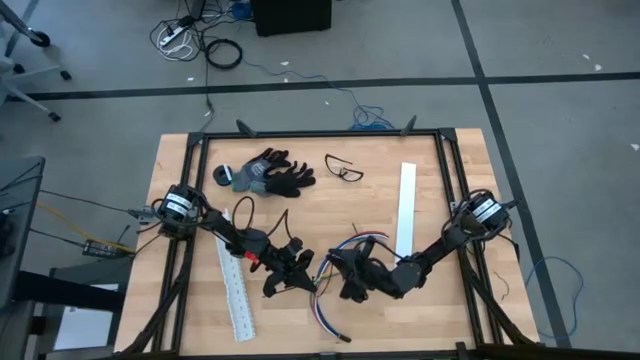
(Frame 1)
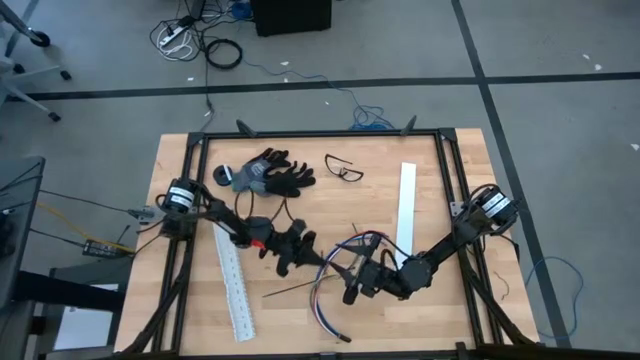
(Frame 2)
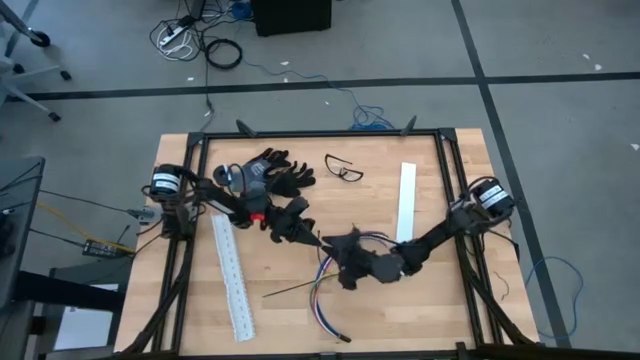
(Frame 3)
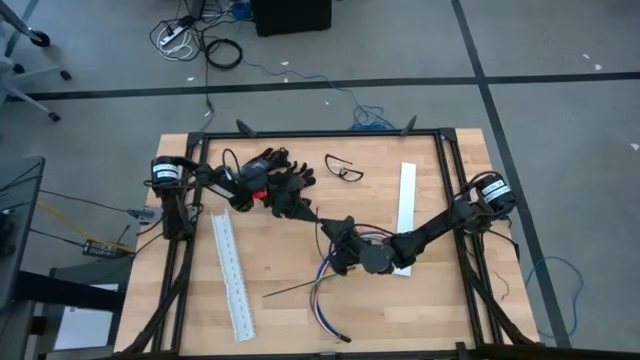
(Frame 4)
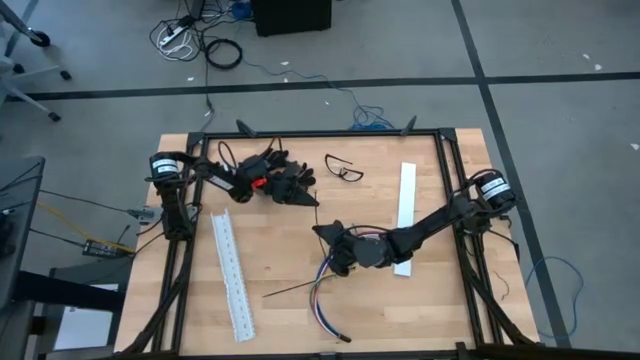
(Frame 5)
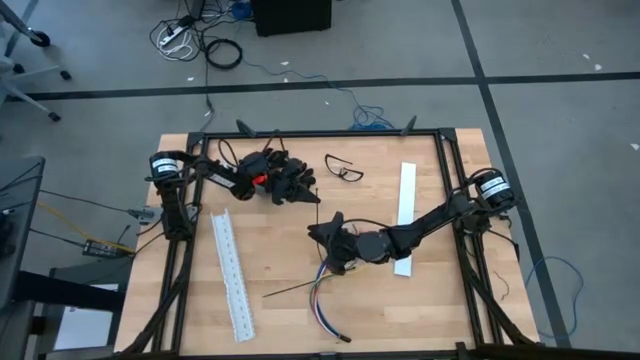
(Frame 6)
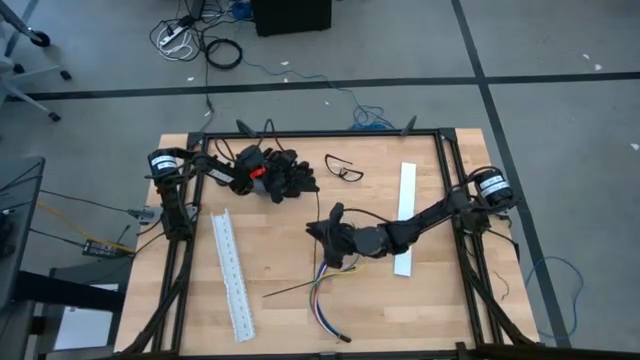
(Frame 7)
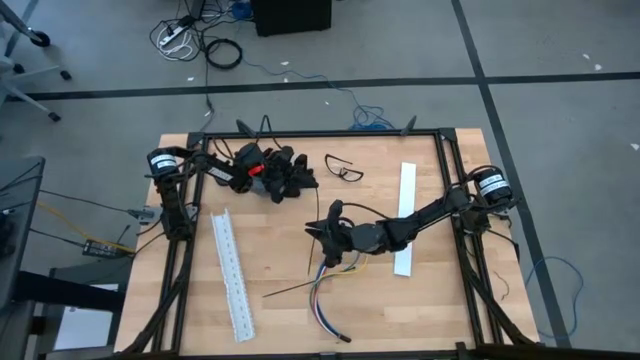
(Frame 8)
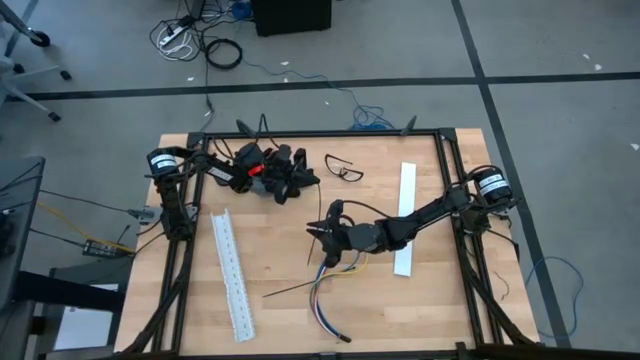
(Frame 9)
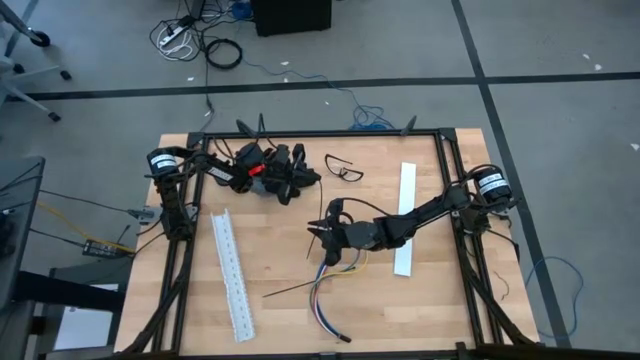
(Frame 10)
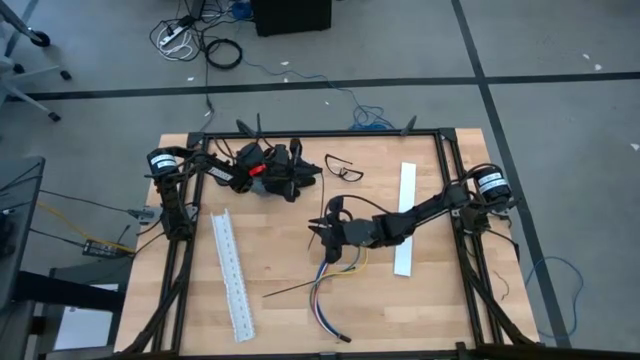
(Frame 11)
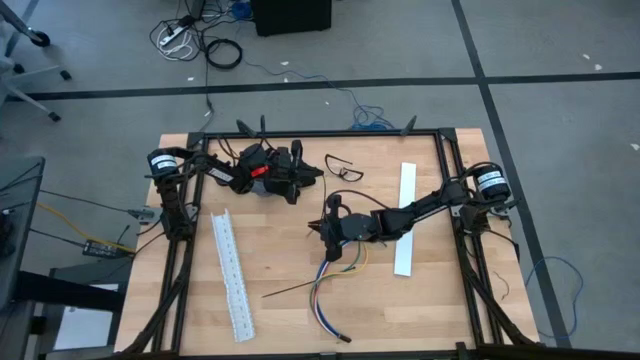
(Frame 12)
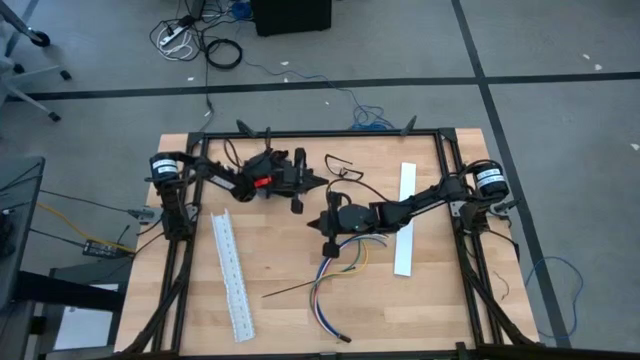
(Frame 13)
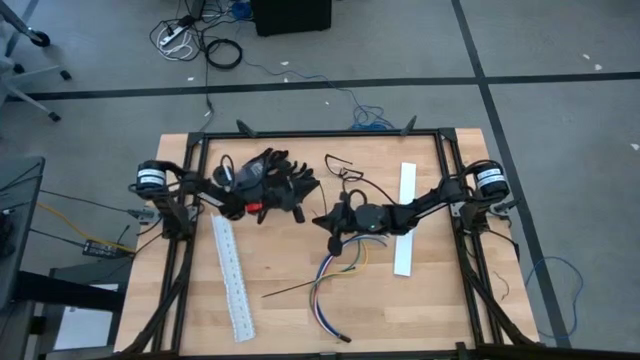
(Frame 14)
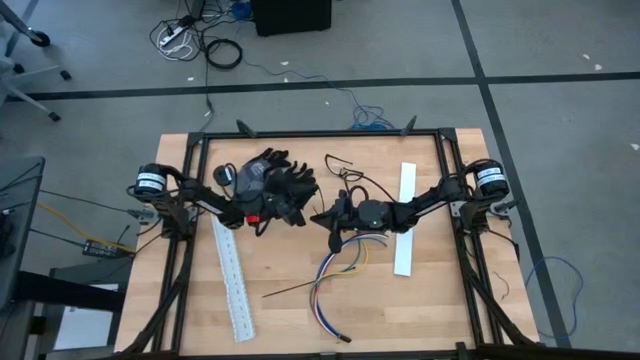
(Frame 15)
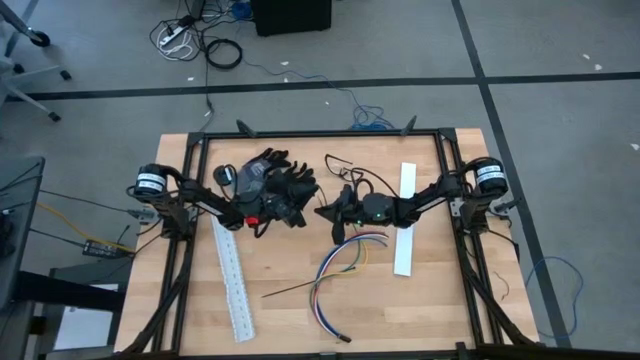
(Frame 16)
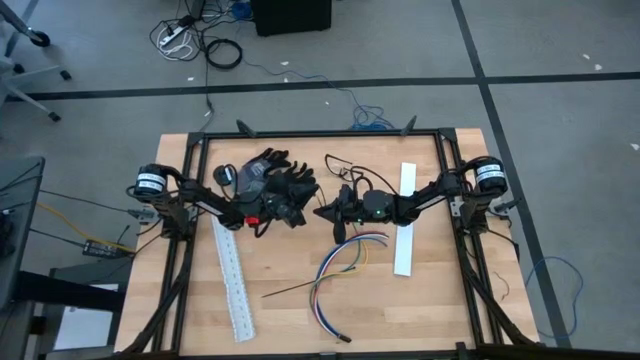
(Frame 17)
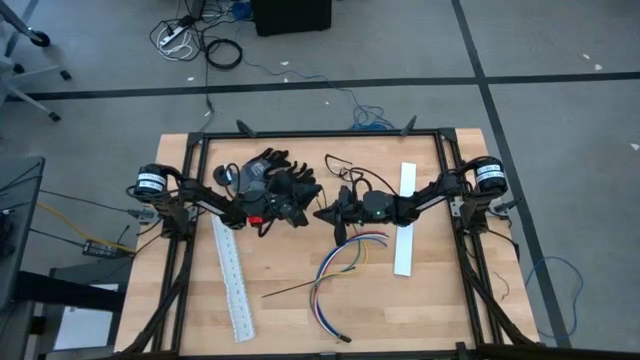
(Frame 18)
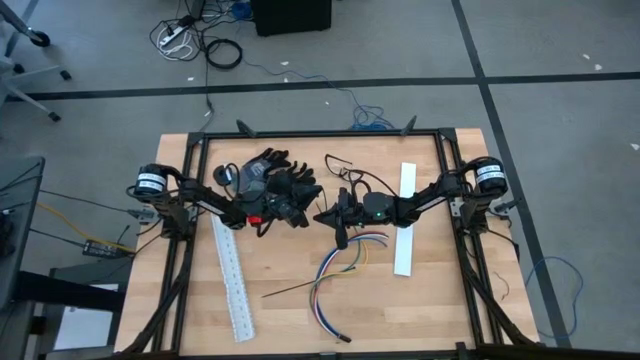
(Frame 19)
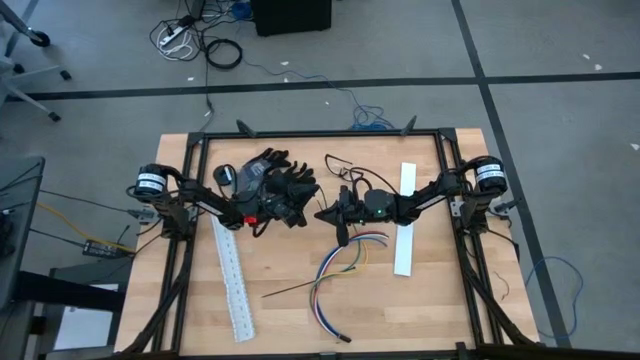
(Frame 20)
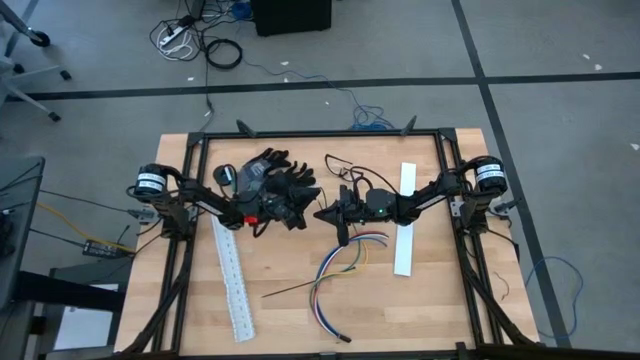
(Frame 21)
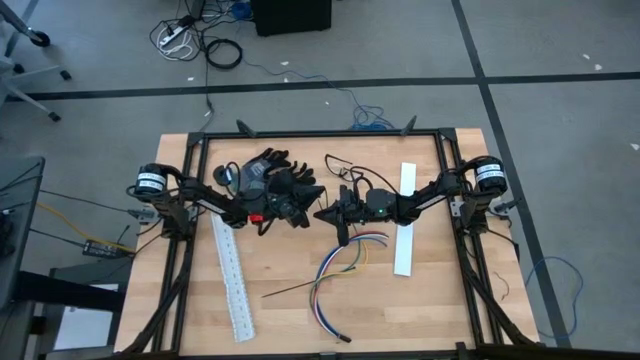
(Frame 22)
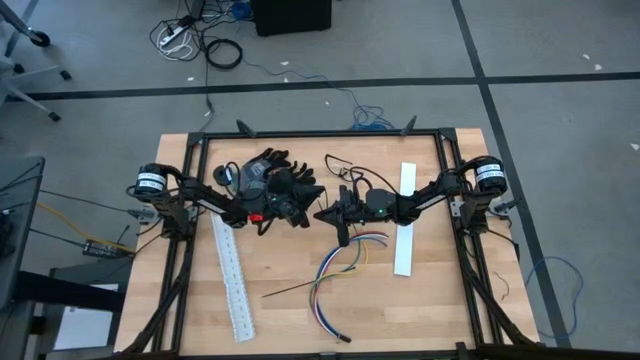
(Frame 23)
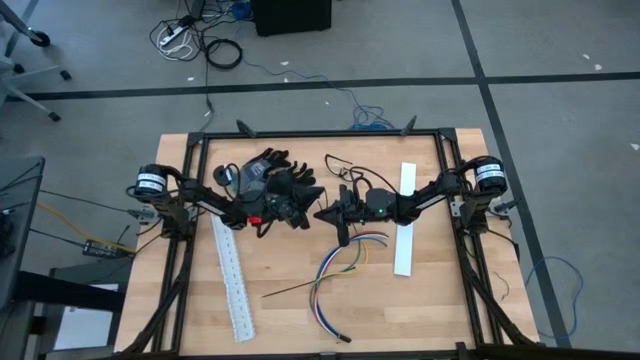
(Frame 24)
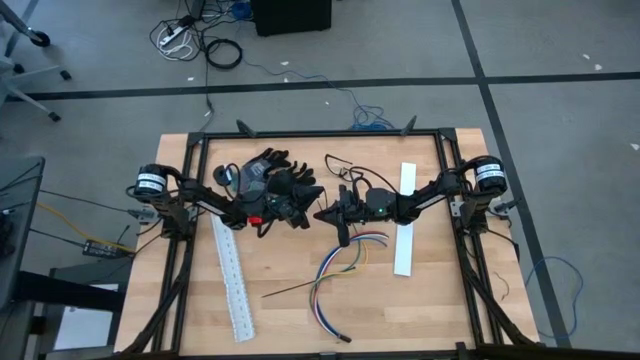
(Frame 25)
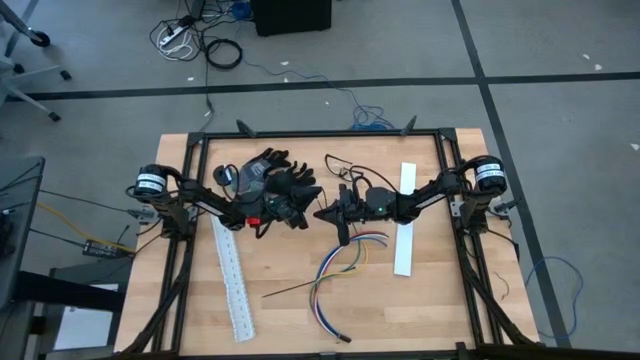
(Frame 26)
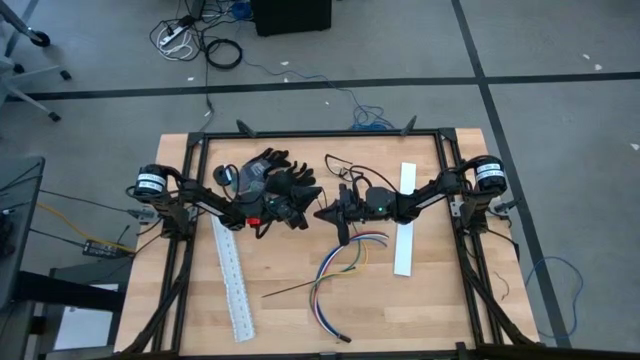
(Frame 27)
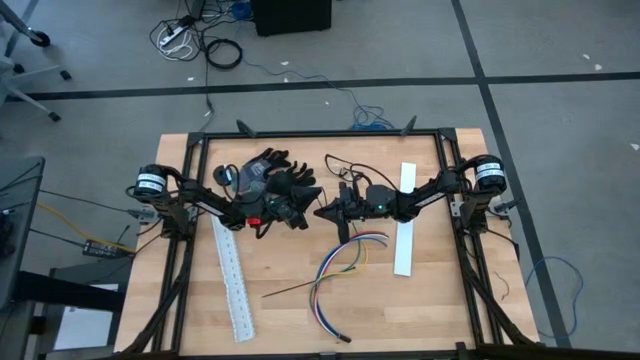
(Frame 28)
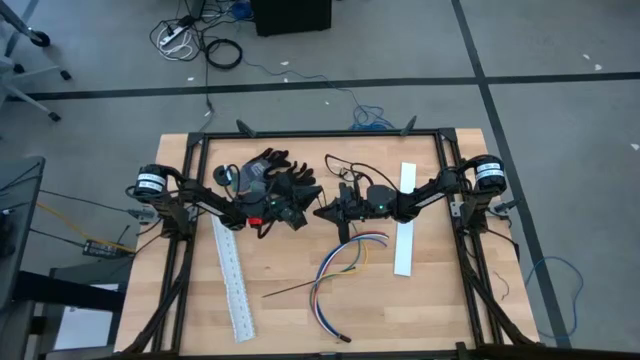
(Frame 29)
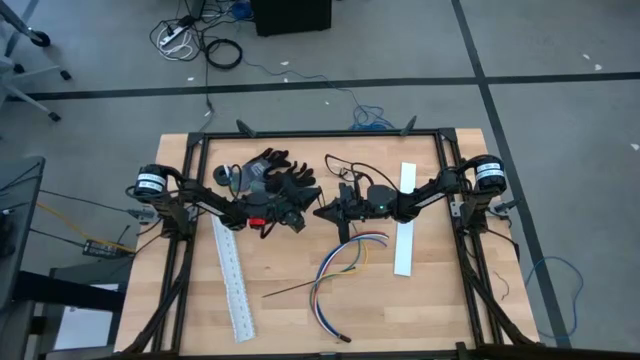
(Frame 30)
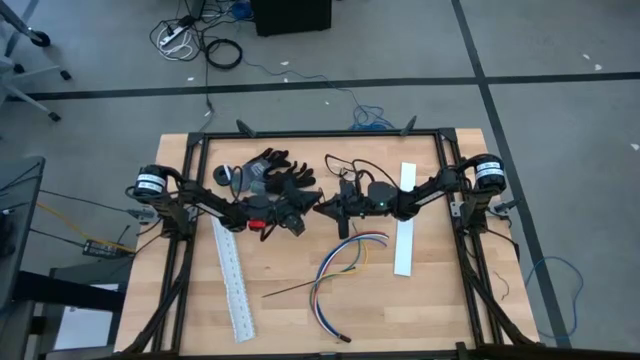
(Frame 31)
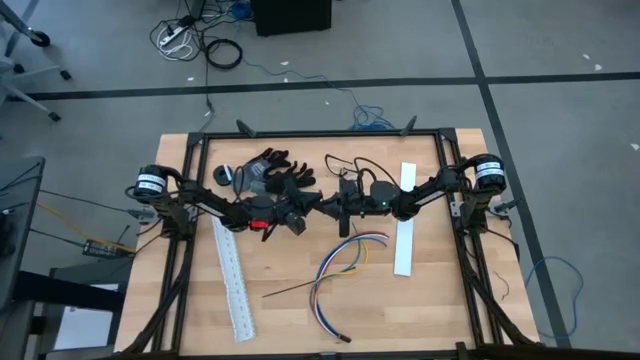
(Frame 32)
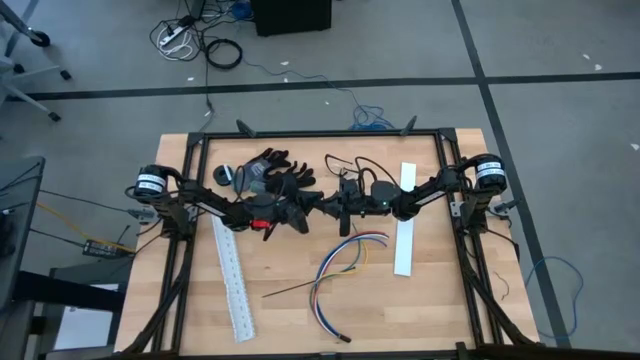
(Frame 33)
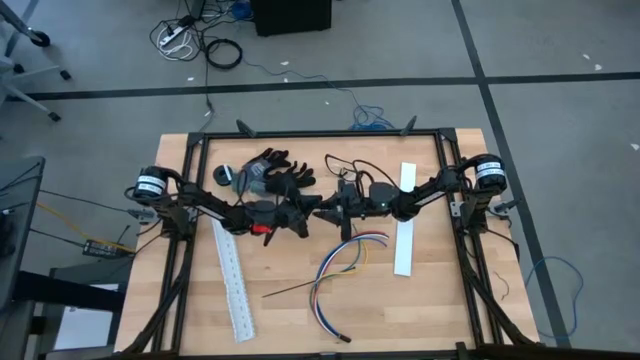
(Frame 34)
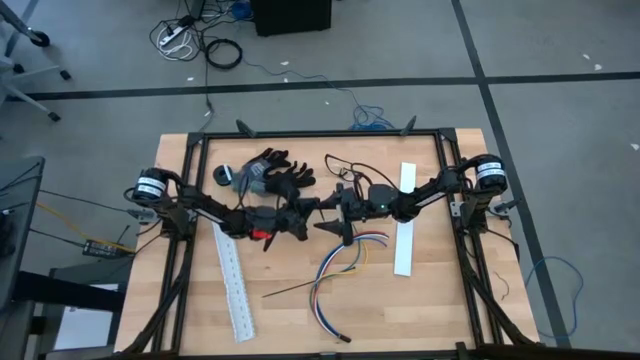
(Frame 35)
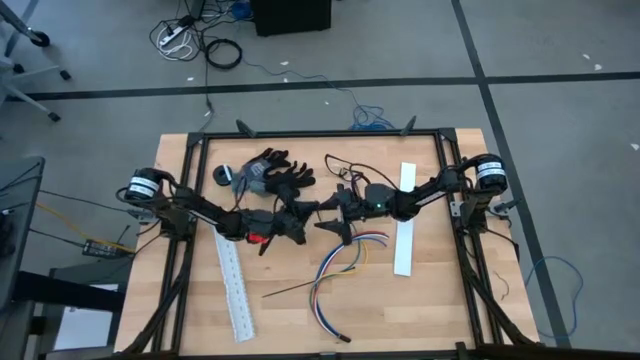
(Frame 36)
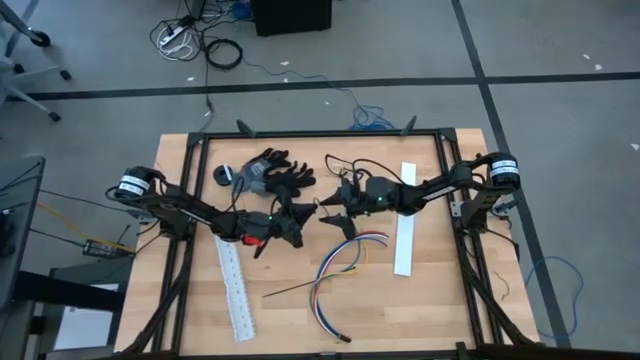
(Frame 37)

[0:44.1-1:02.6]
Task: Ziptie cables
Insert the top black zip tie pointed tail end through the slot to form a loop
